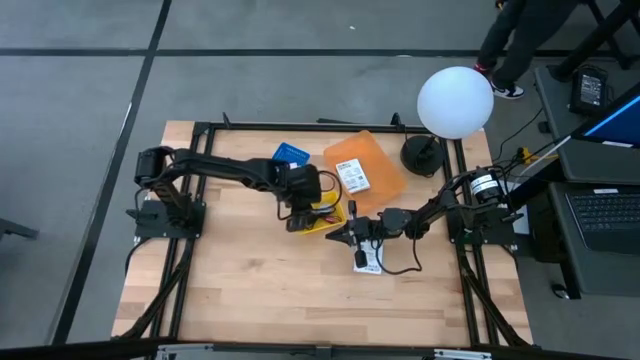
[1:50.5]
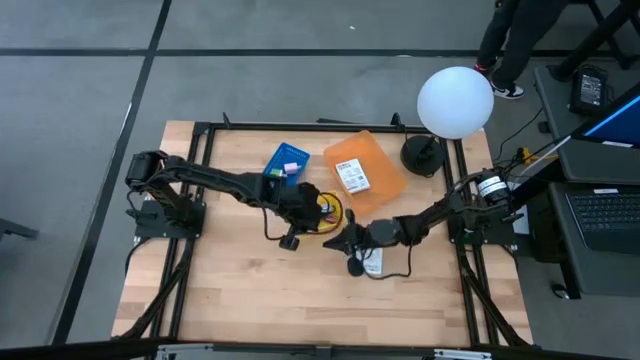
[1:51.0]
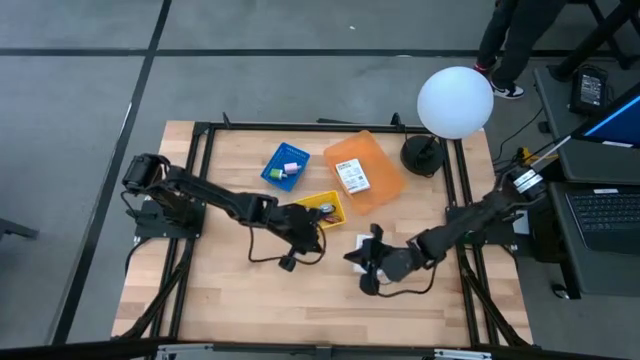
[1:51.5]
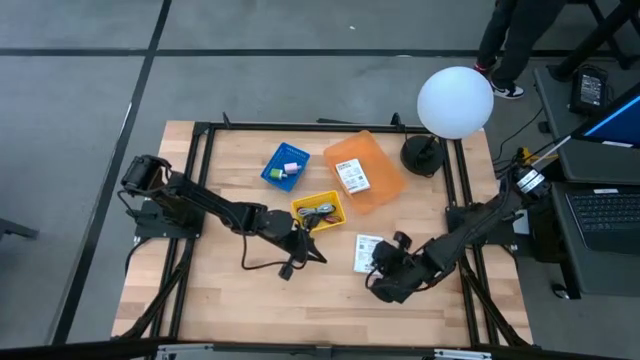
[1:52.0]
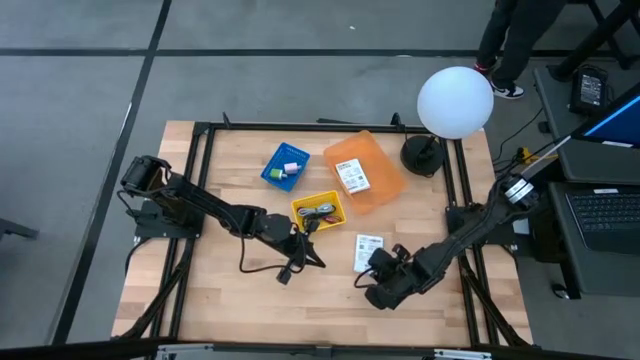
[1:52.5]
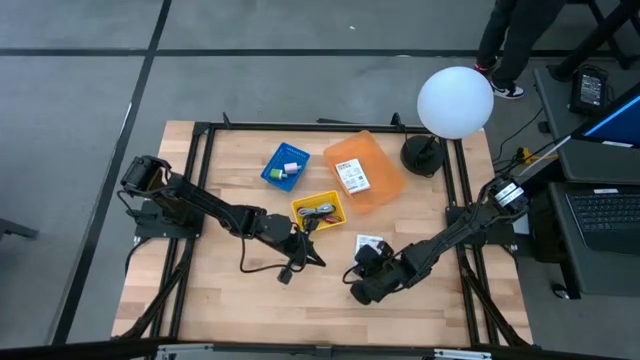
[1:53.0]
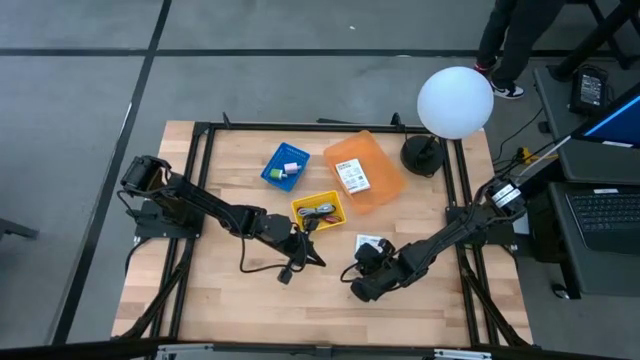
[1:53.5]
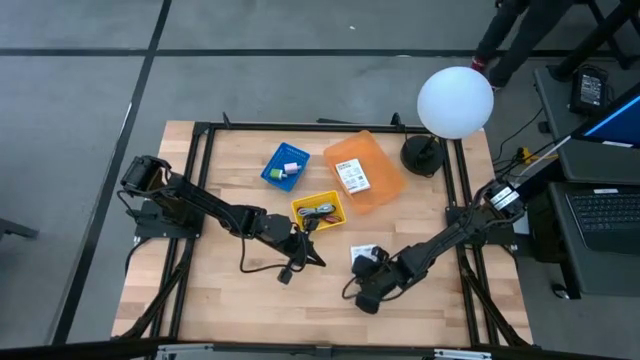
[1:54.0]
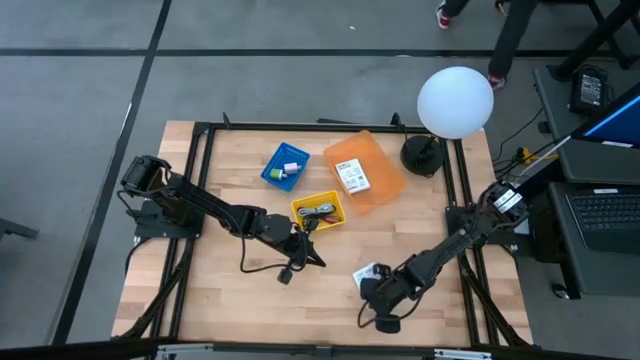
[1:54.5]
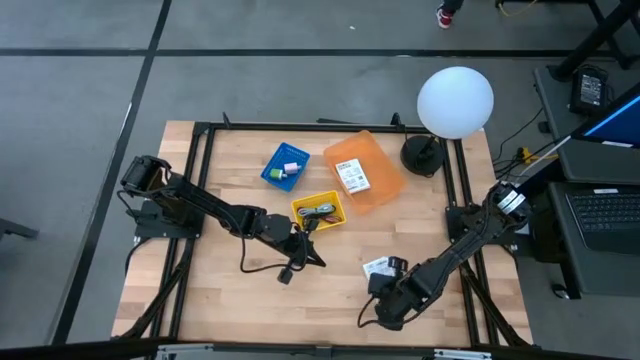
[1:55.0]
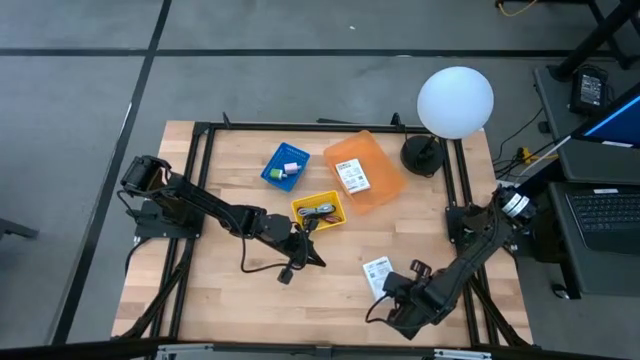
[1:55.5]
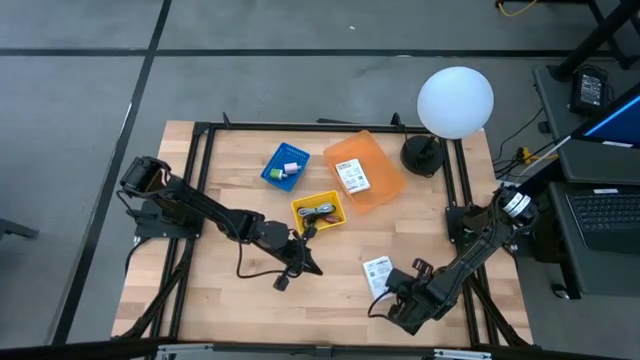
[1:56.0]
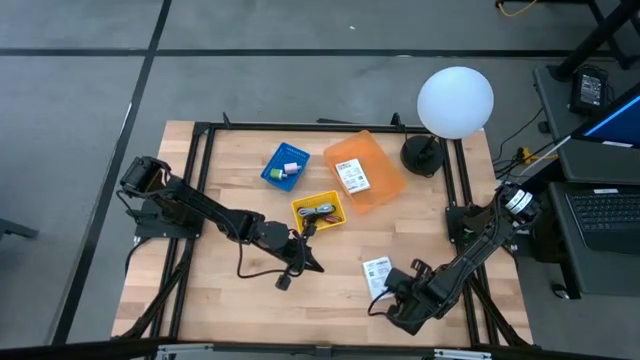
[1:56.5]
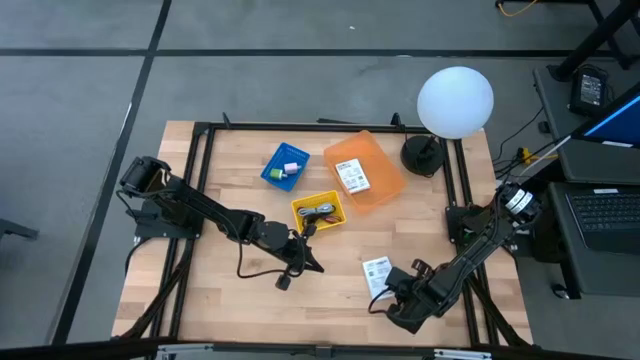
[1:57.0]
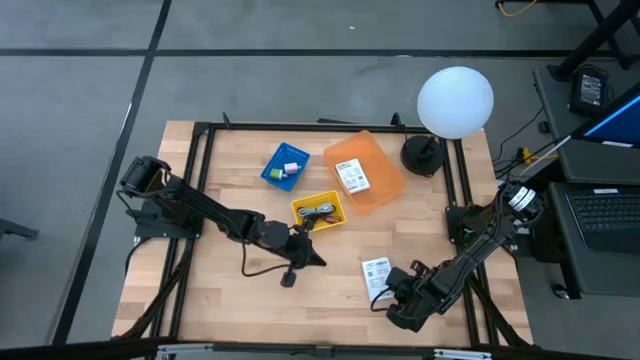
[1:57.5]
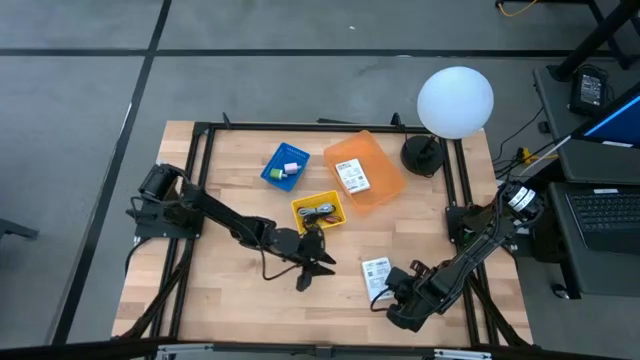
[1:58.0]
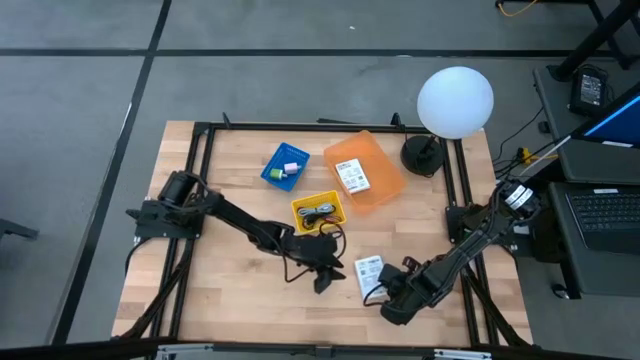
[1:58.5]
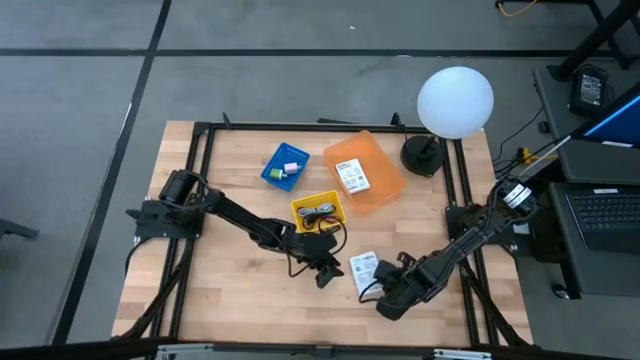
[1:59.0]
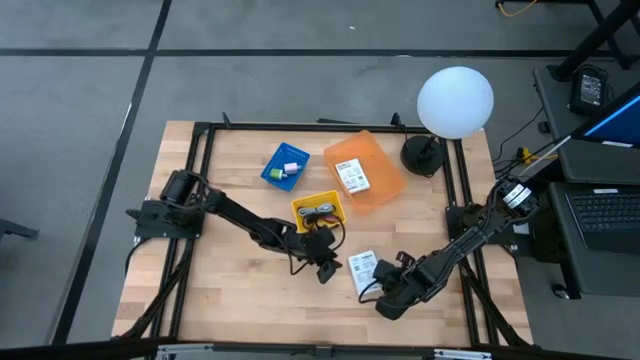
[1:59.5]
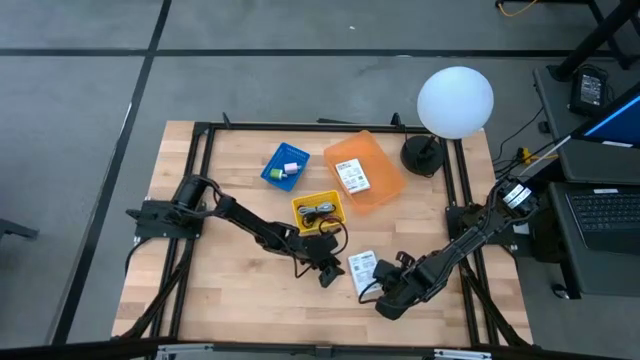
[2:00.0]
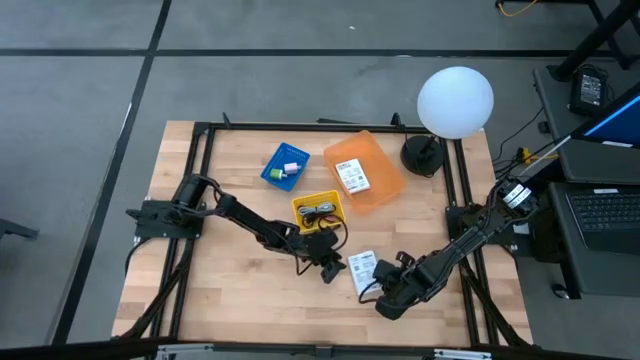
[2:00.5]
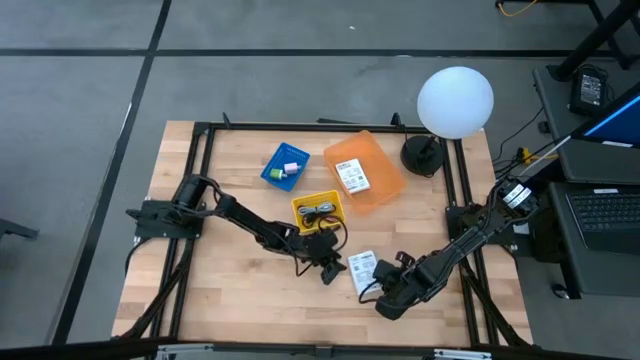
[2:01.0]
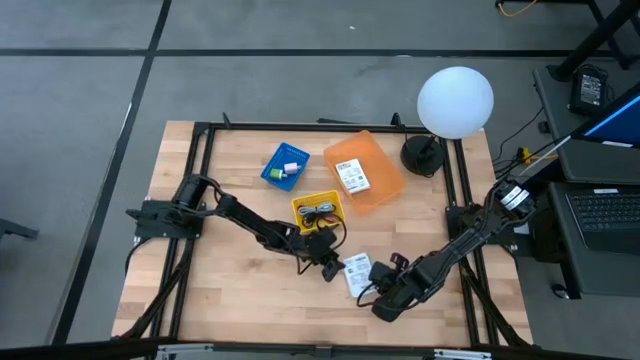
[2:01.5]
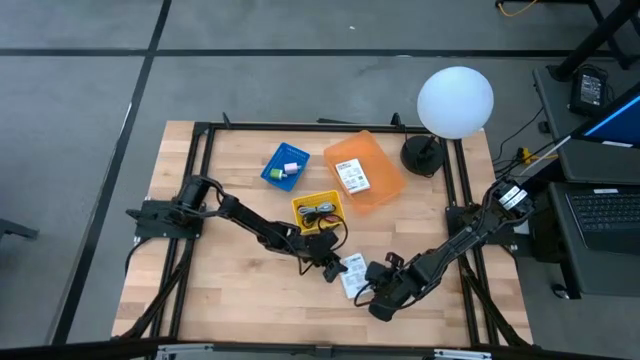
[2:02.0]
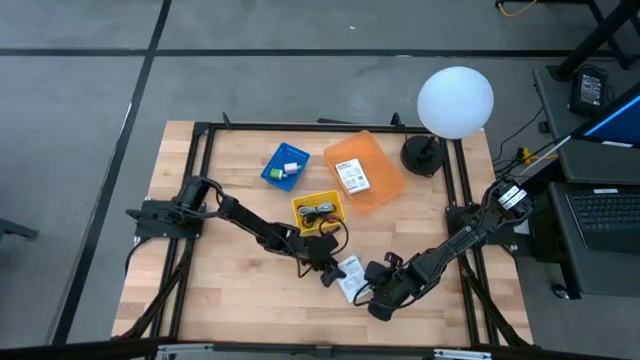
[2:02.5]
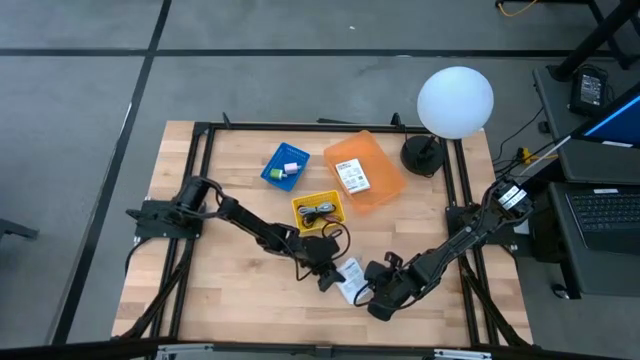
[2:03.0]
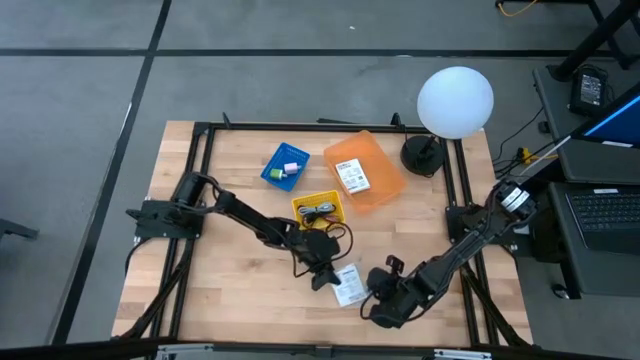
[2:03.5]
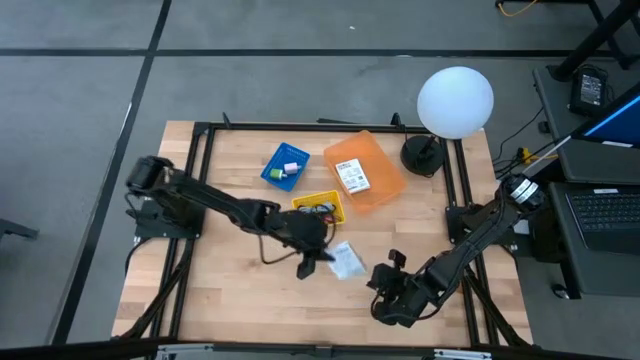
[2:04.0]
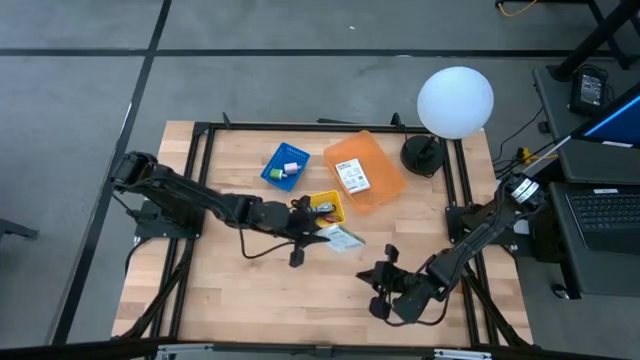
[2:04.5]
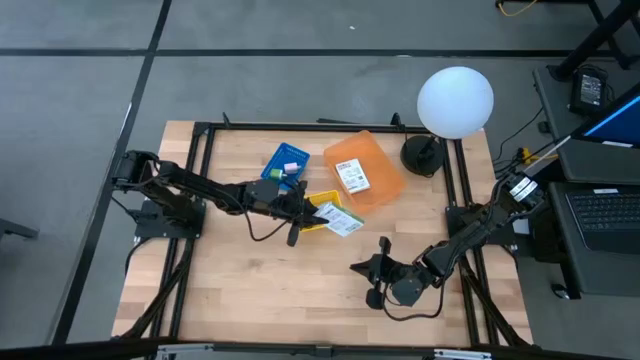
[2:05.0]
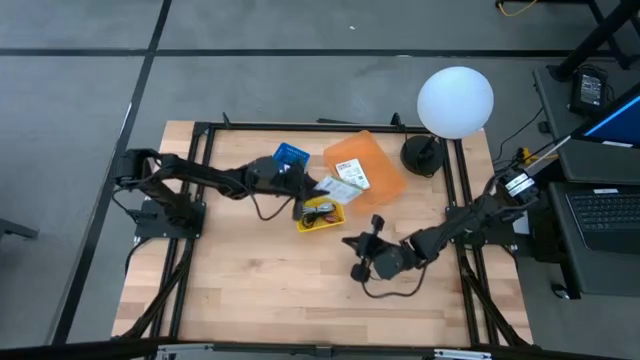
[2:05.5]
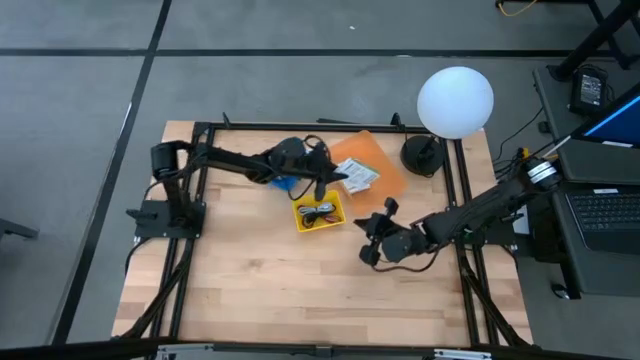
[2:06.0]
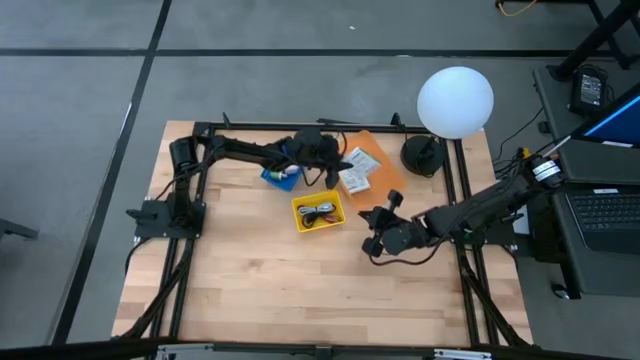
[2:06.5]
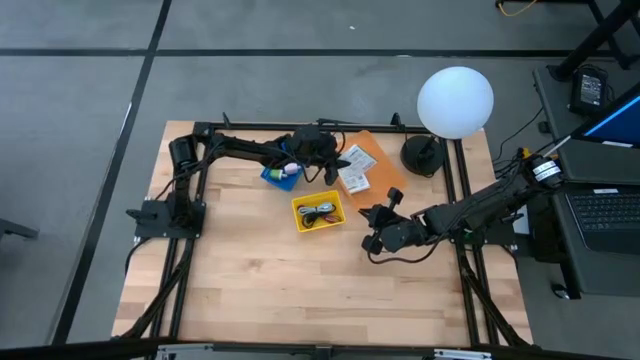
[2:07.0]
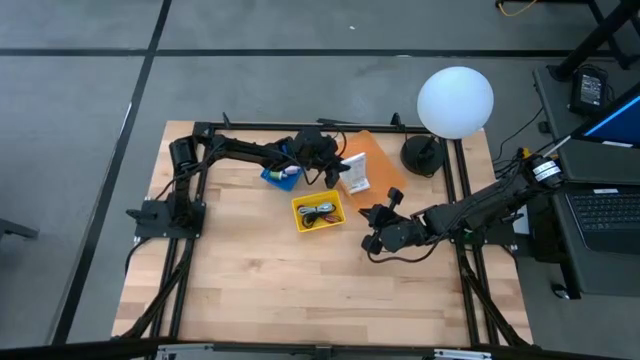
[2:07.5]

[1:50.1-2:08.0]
Task: Pick and place items into bin
Put the white card reader box into the orange bin

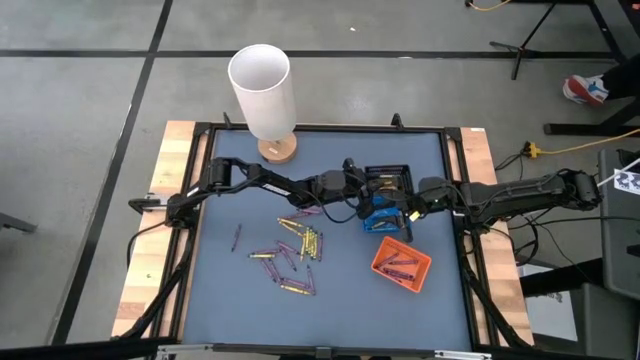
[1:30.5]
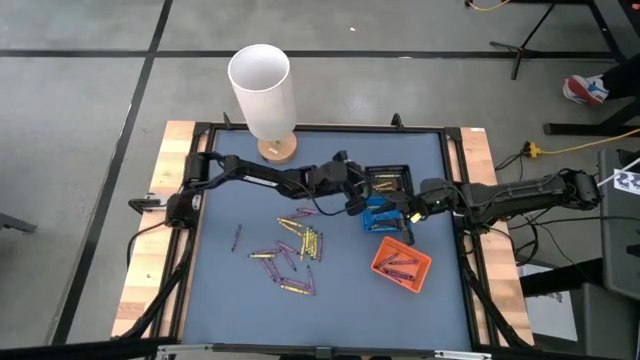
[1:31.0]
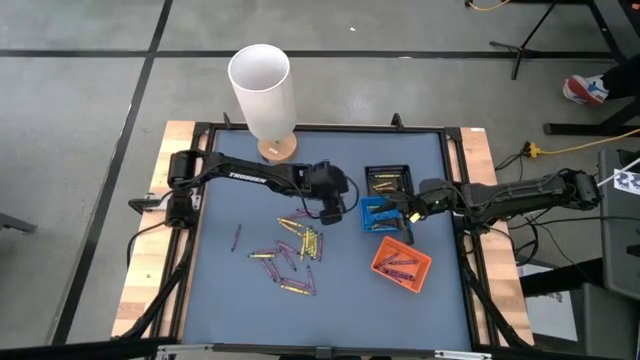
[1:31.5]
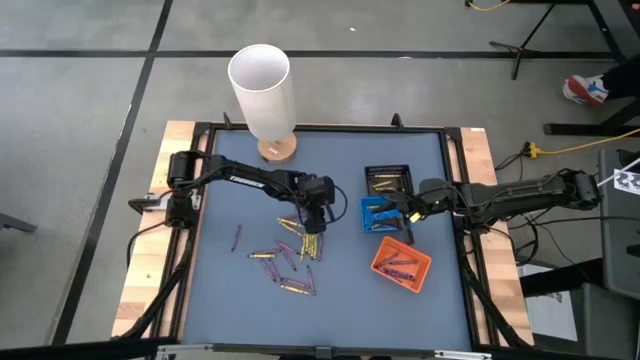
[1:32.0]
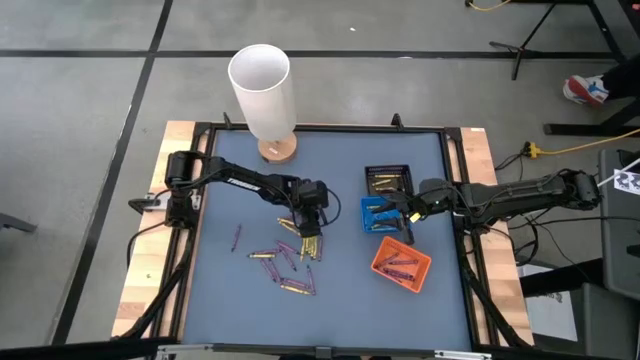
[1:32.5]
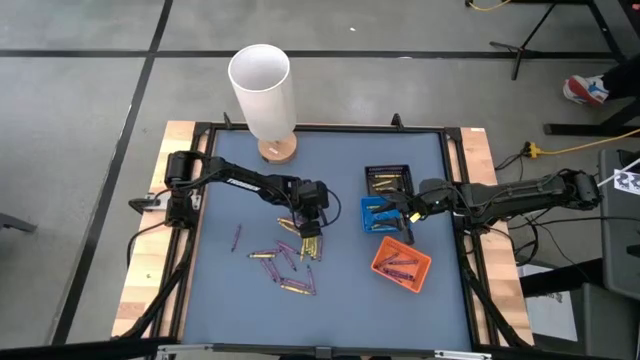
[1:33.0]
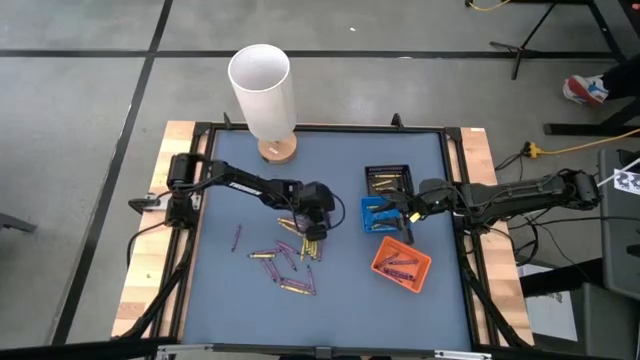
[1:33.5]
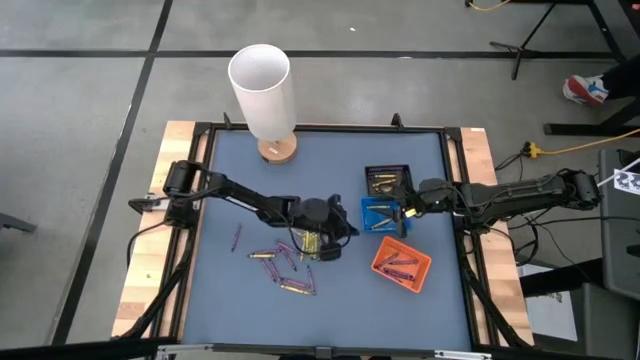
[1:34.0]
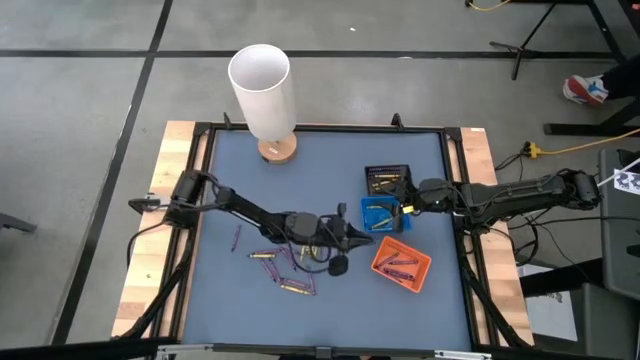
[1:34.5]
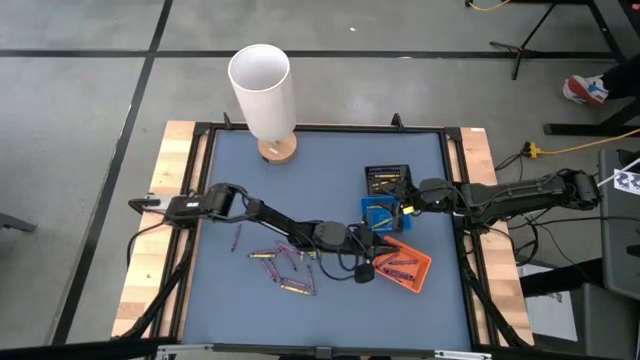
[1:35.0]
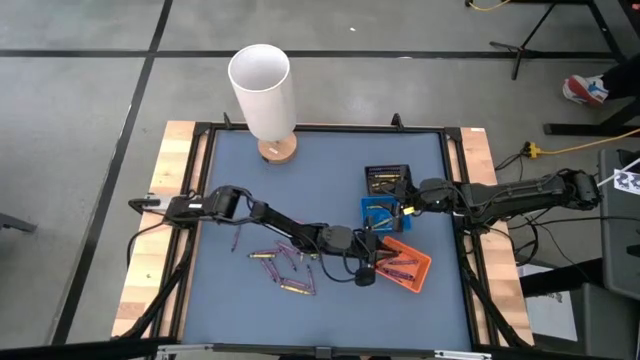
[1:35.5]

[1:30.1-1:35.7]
Task: Sort crayons
Put the purple crayon into the orange bin
